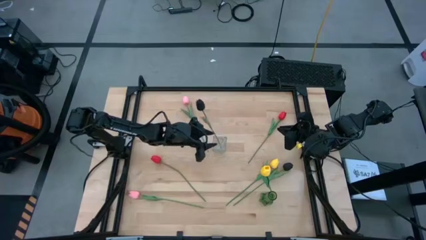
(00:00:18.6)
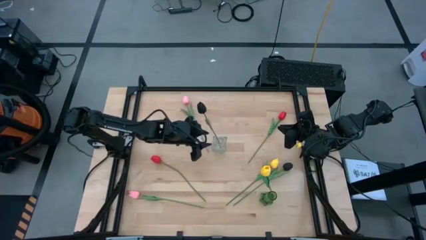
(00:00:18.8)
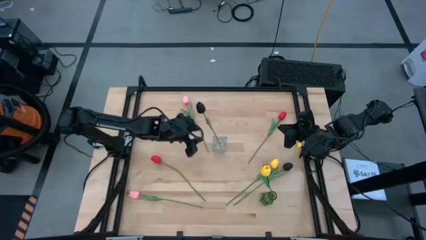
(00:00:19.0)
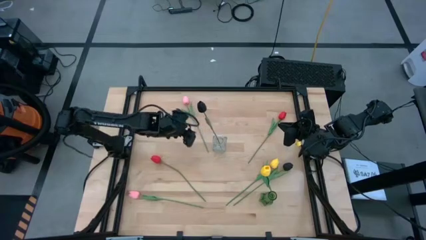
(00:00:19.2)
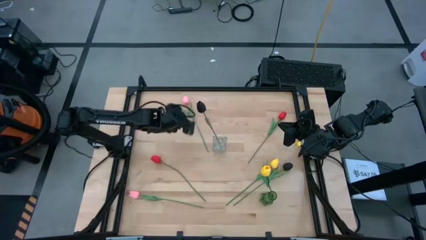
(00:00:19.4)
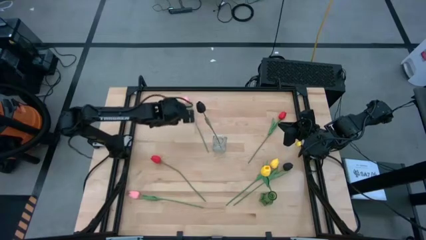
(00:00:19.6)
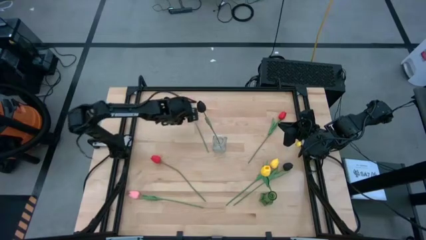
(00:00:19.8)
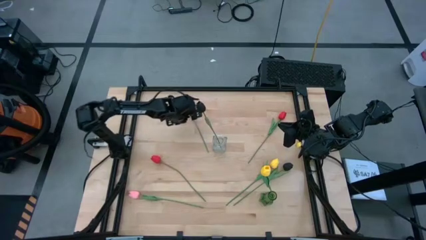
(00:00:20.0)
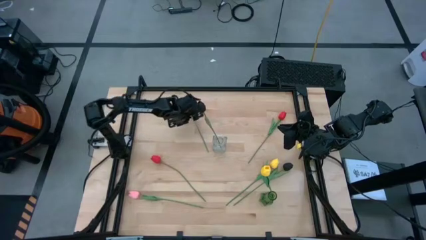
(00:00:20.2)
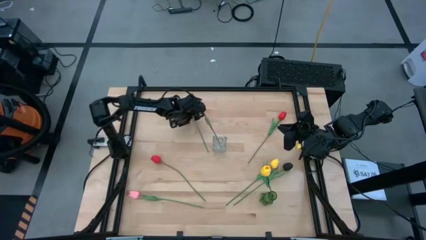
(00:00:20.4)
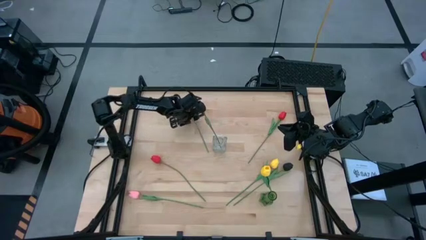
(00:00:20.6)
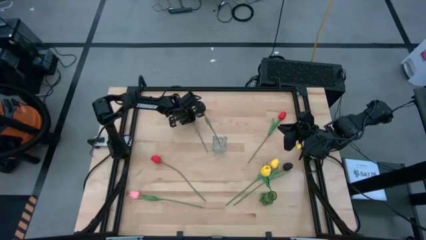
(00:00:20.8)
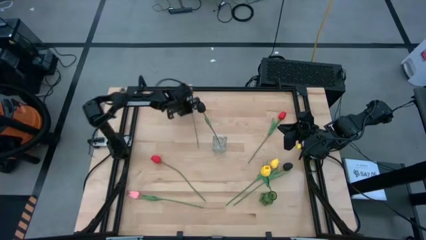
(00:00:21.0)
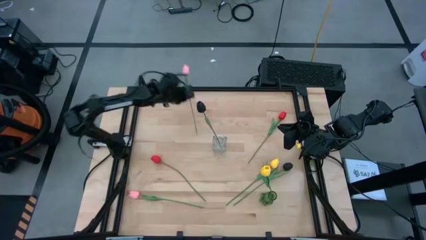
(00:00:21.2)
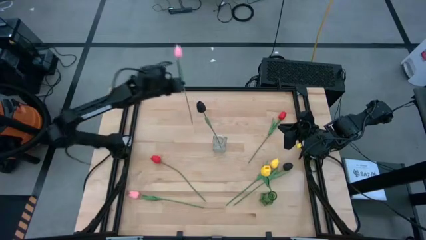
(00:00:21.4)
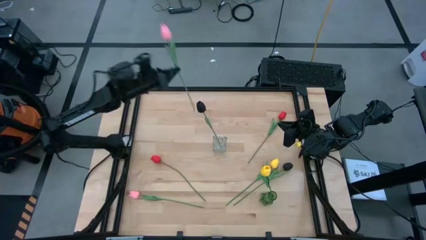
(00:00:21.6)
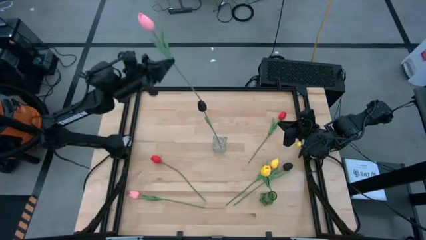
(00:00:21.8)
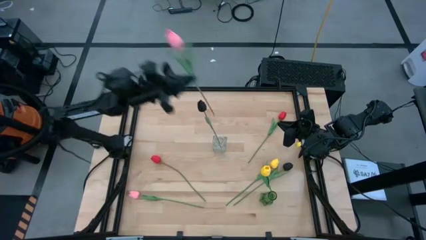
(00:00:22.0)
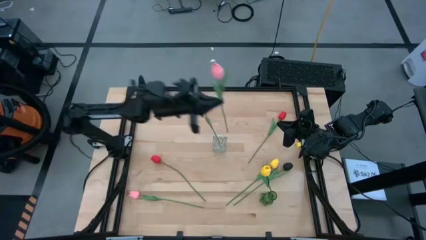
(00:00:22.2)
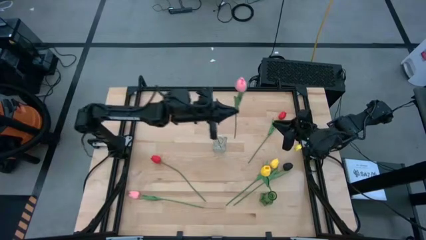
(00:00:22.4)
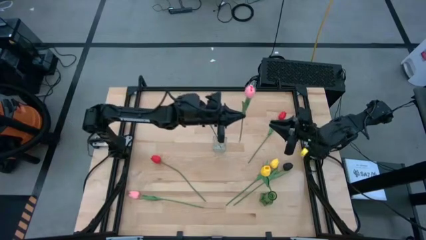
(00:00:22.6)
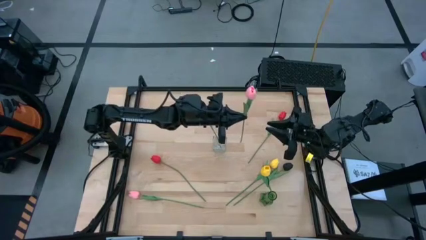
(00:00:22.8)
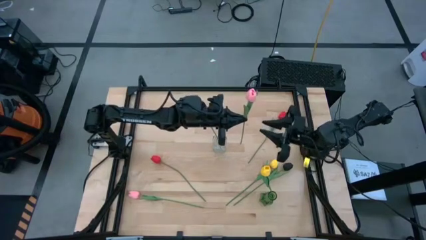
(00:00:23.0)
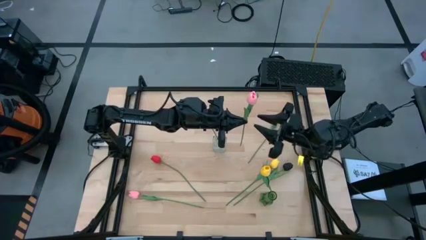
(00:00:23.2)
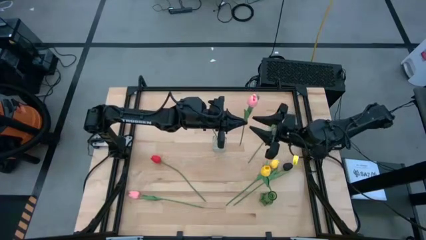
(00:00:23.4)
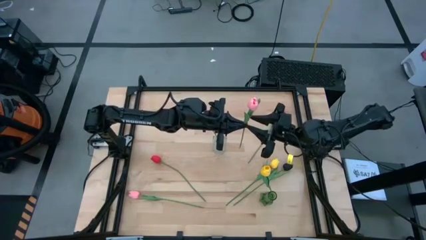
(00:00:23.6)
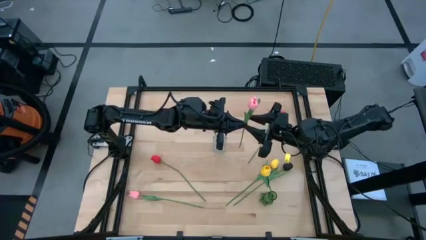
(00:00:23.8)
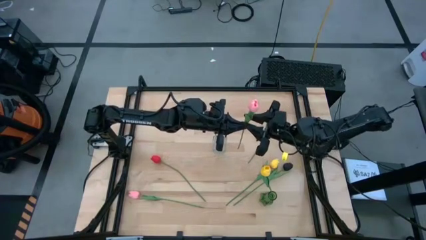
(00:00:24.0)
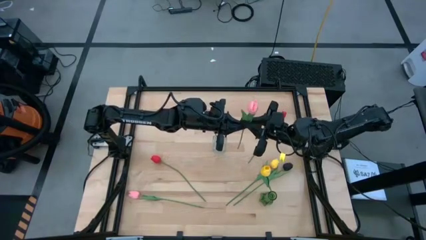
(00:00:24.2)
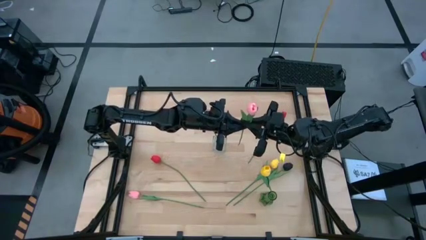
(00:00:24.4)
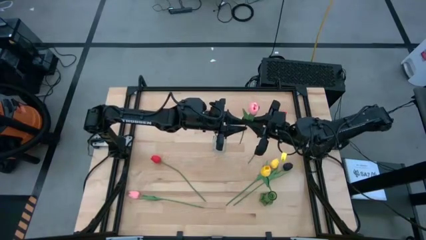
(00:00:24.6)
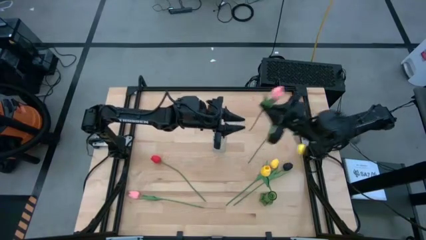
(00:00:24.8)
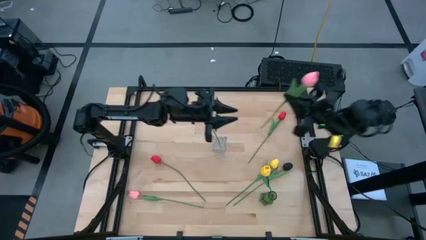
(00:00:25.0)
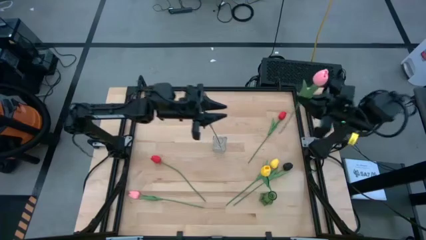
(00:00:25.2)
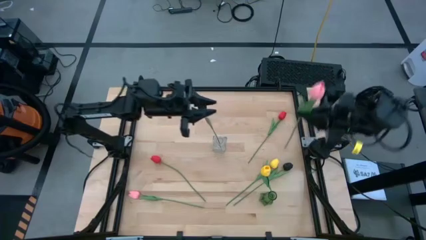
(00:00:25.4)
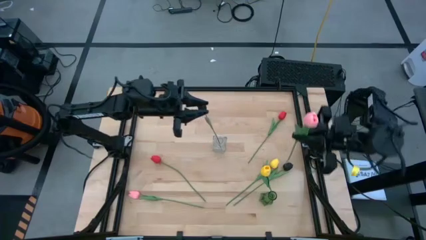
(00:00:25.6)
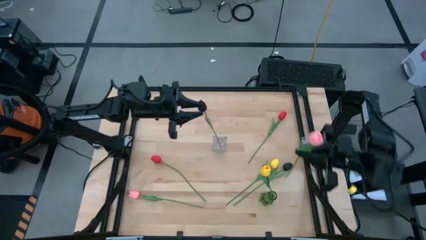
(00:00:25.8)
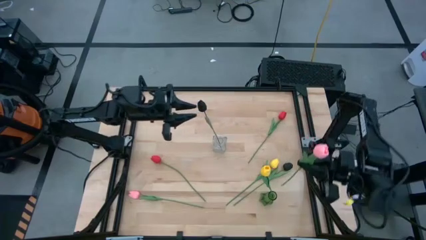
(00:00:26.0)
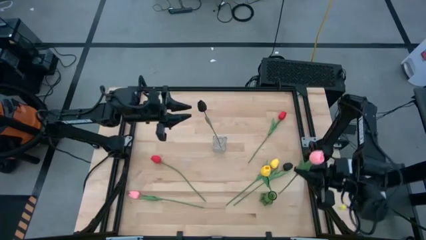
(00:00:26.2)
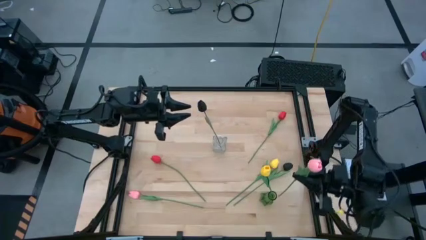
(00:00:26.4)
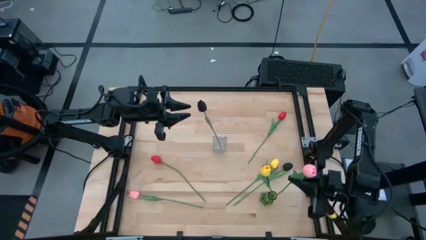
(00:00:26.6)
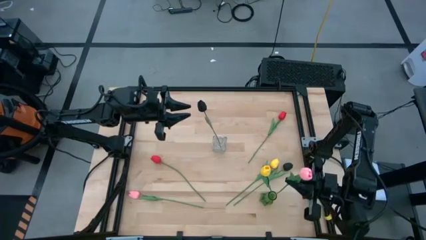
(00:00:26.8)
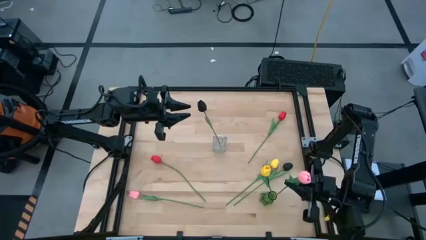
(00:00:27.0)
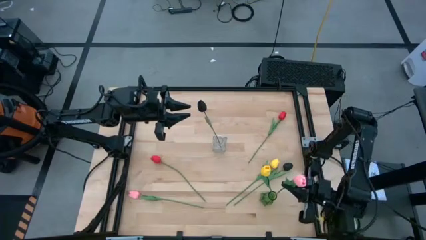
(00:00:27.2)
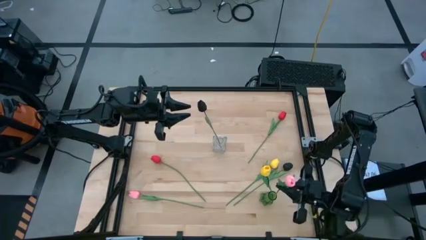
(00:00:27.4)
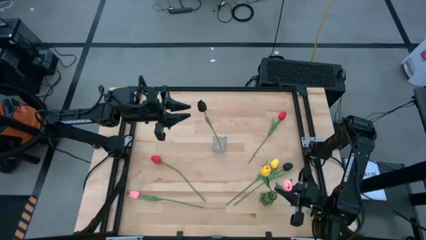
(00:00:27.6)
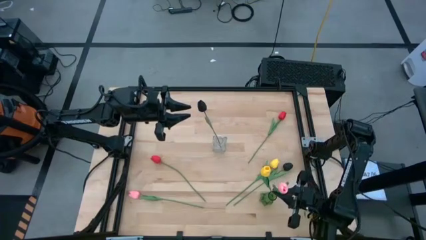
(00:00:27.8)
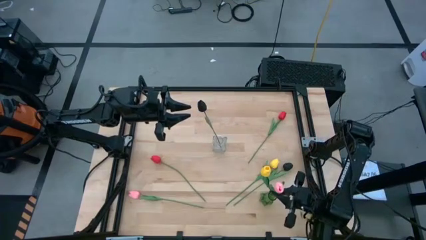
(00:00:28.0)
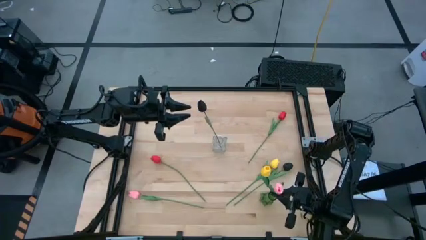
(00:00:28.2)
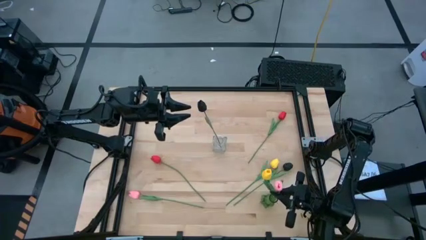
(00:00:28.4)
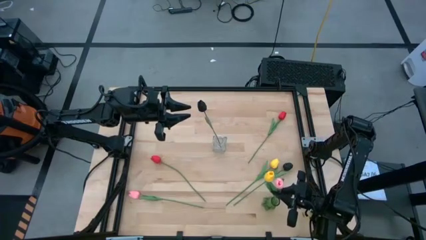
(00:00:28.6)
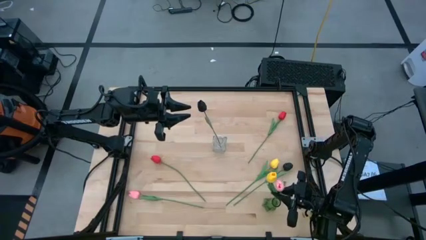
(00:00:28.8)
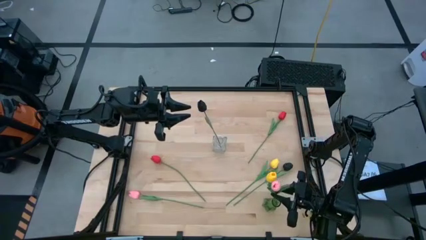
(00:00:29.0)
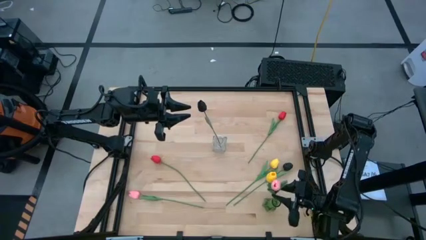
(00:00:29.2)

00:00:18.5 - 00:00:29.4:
Task: Sort flowers into vase by color
Put the top pink flower into the green vase

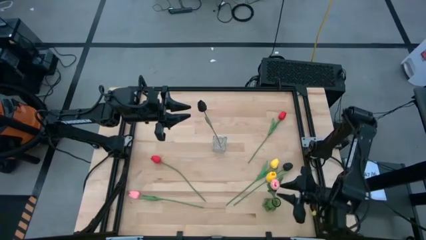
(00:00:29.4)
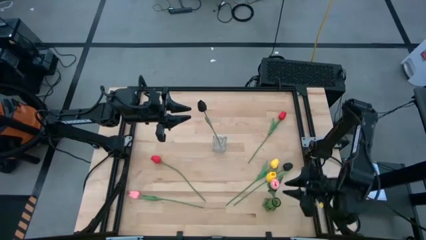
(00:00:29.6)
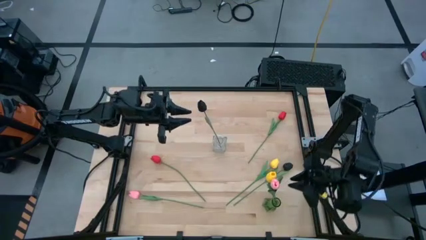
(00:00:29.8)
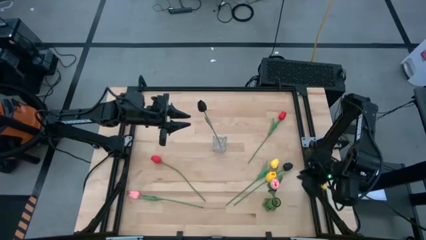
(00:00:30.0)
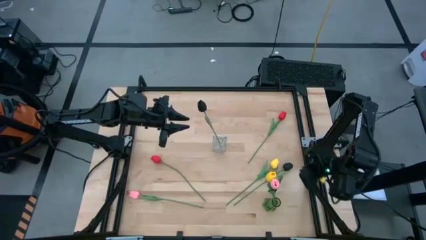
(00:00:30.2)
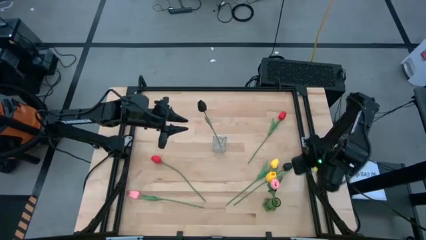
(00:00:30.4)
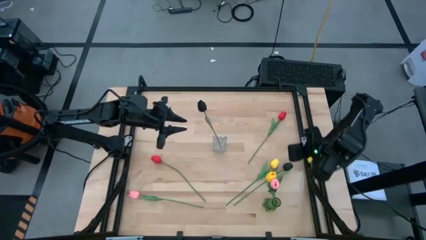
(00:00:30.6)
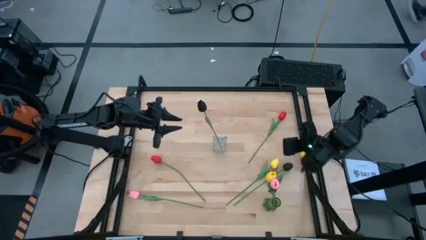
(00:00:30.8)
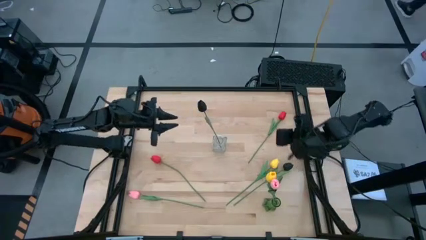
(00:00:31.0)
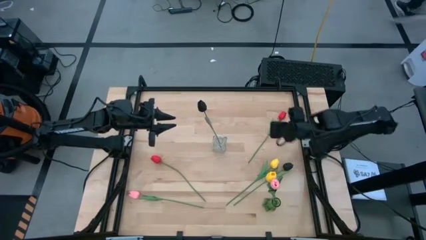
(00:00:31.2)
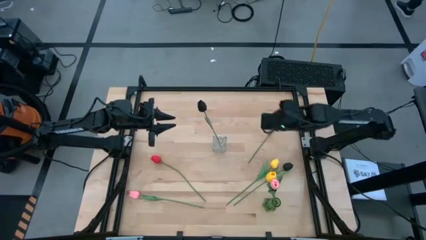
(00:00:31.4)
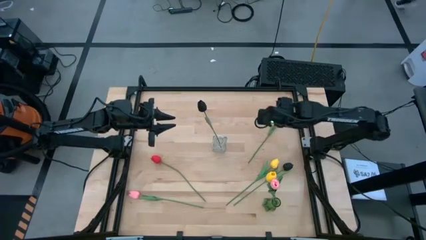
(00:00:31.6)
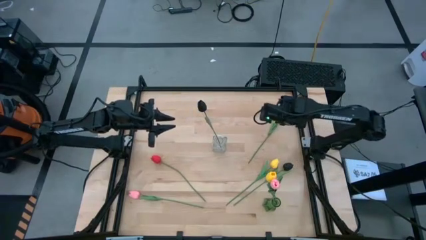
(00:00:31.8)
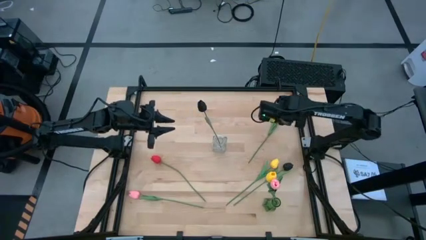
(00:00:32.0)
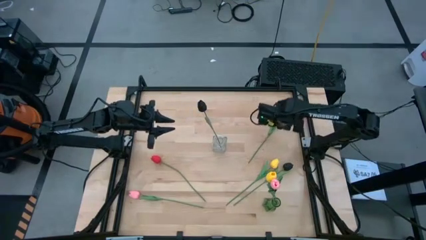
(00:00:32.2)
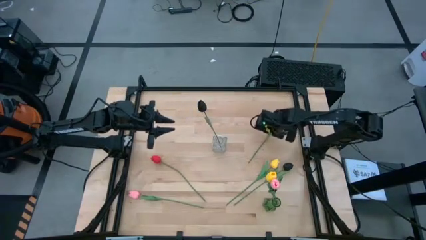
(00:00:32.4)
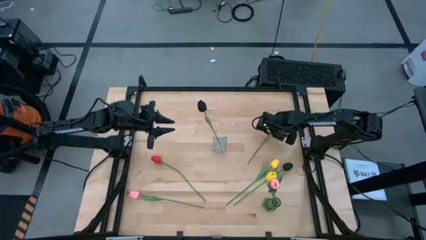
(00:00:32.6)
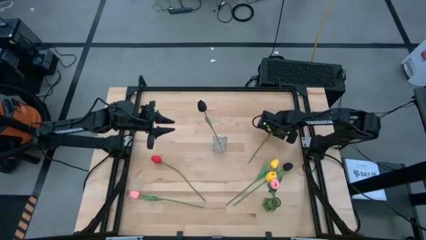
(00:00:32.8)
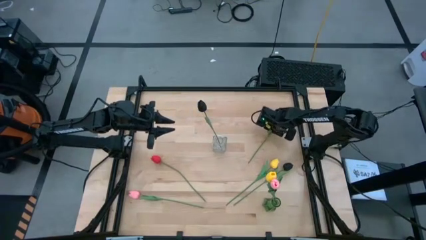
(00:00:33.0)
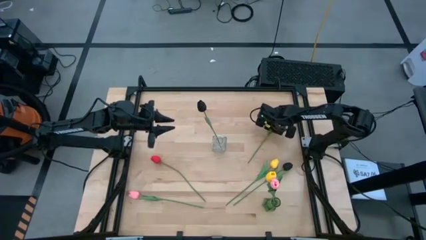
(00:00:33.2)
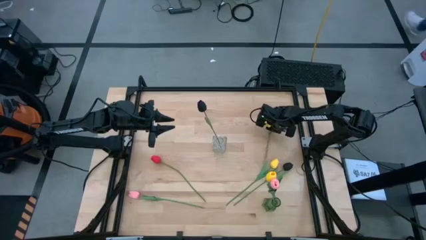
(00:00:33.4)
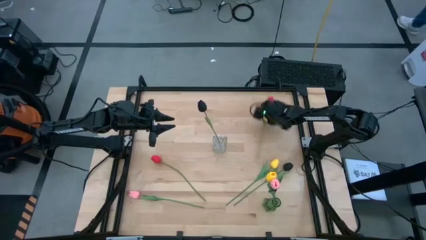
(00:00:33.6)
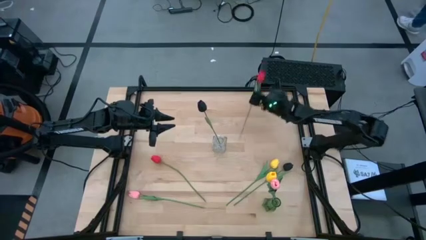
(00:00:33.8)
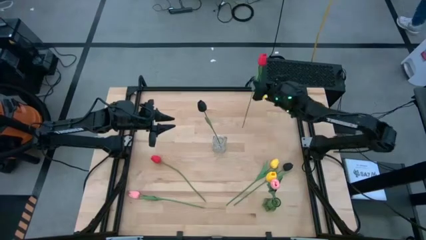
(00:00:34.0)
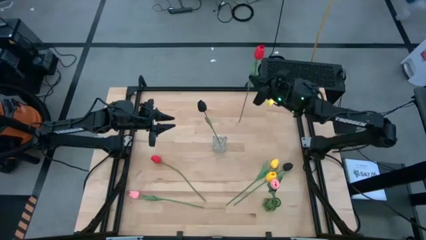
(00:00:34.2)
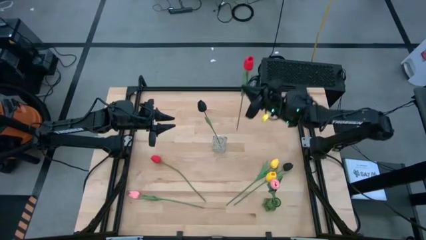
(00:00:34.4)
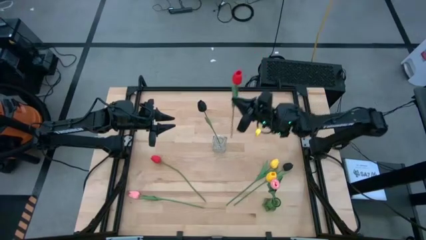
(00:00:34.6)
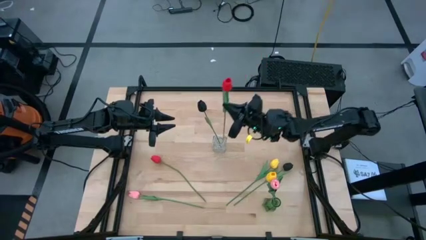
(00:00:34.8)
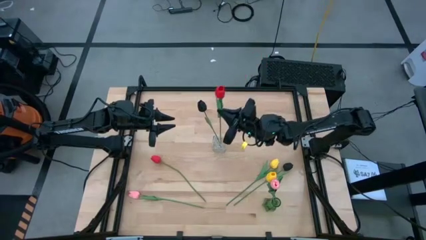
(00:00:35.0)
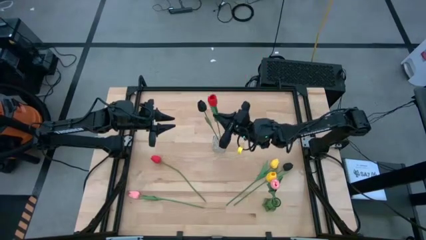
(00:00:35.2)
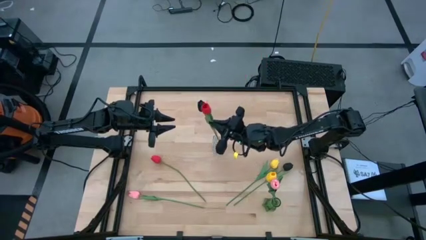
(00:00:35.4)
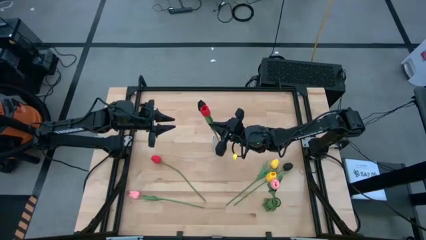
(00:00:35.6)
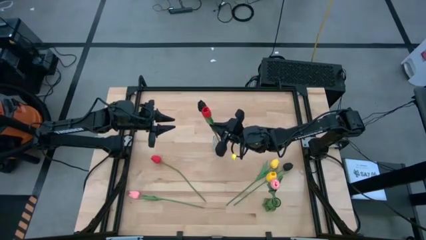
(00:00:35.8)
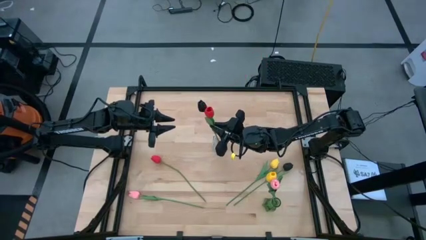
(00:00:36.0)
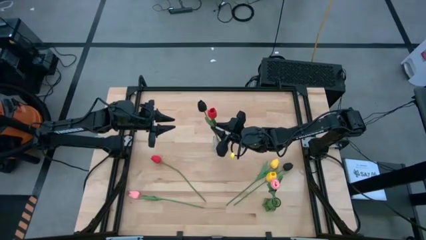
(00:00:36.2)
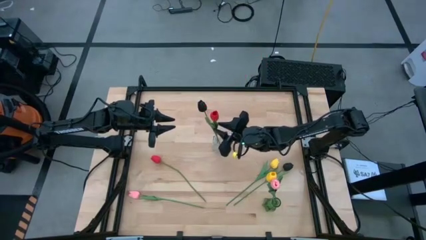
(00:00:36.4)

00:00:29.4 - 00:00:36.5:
Put the top red flower into the transparent vase
